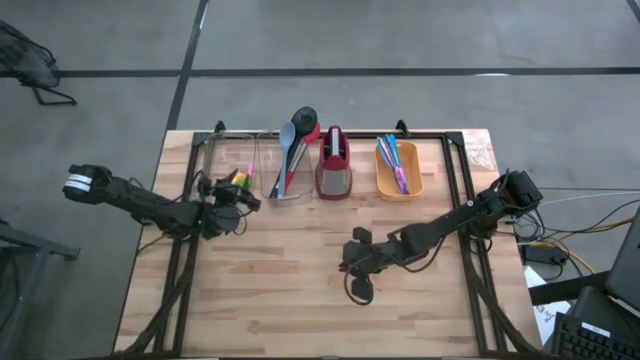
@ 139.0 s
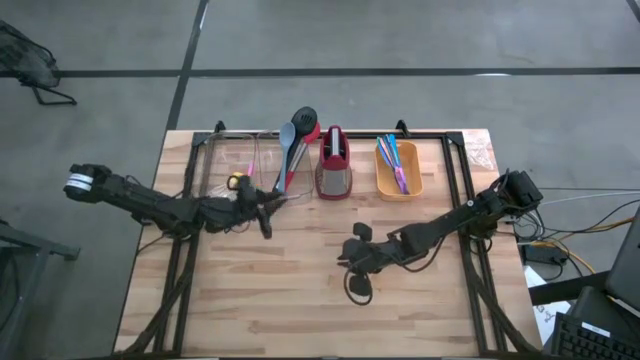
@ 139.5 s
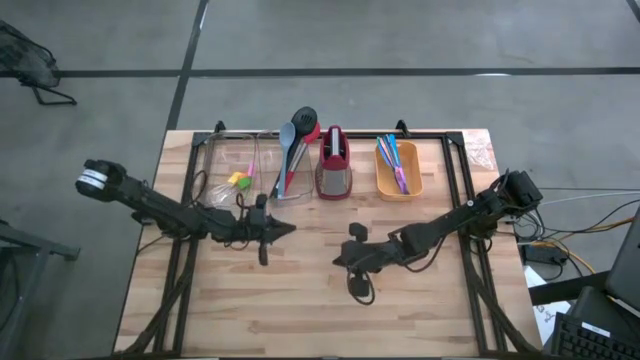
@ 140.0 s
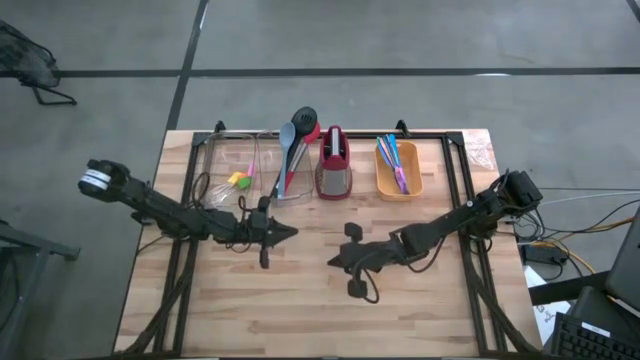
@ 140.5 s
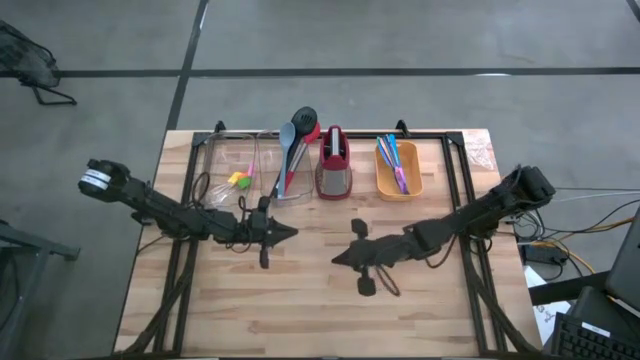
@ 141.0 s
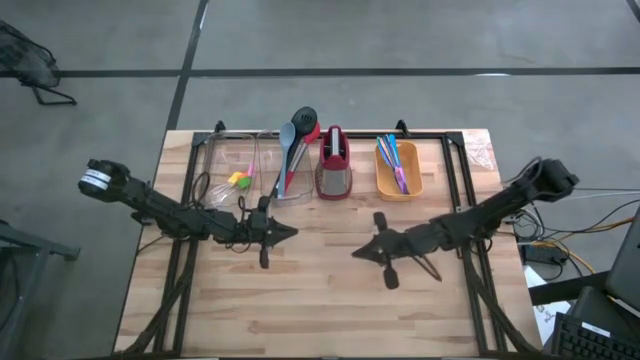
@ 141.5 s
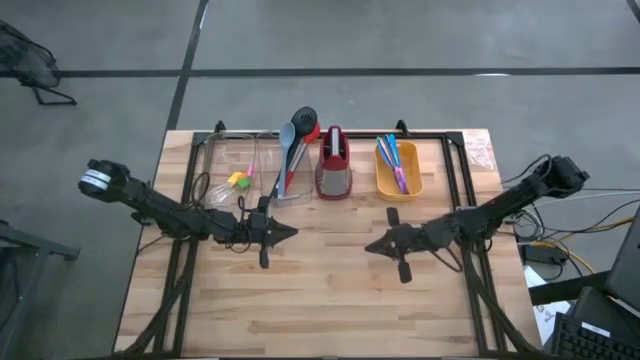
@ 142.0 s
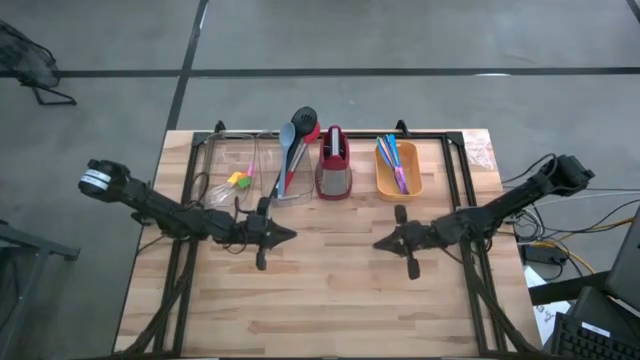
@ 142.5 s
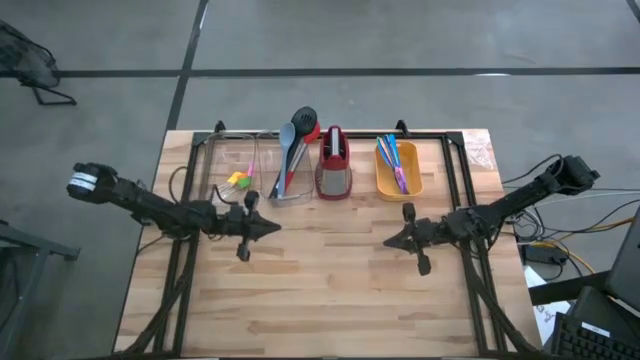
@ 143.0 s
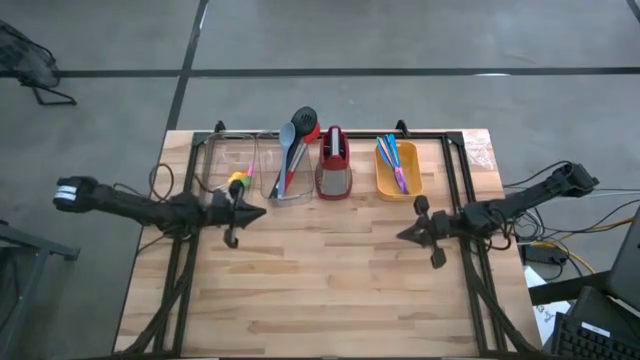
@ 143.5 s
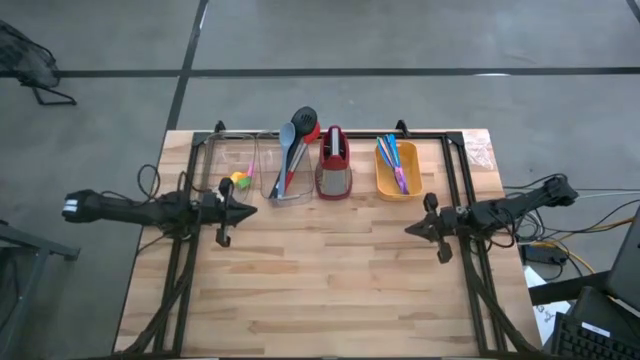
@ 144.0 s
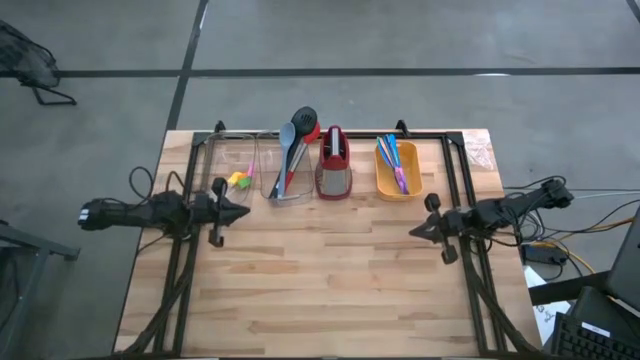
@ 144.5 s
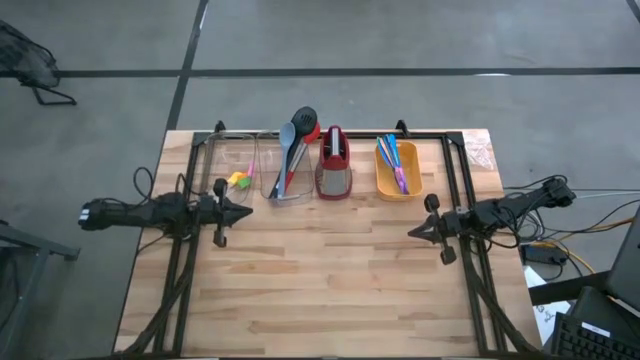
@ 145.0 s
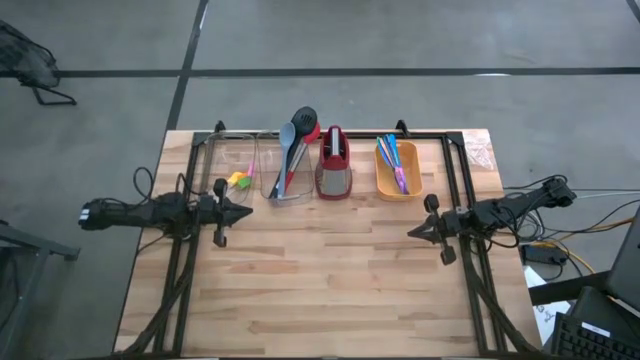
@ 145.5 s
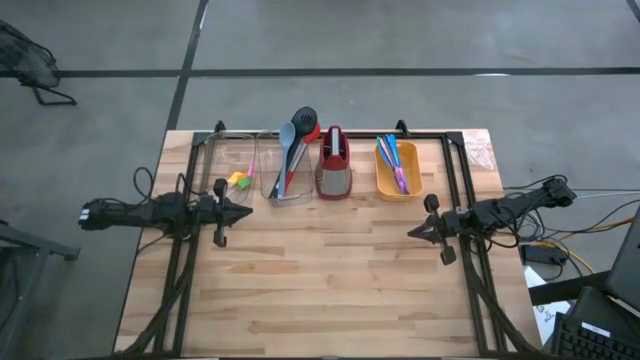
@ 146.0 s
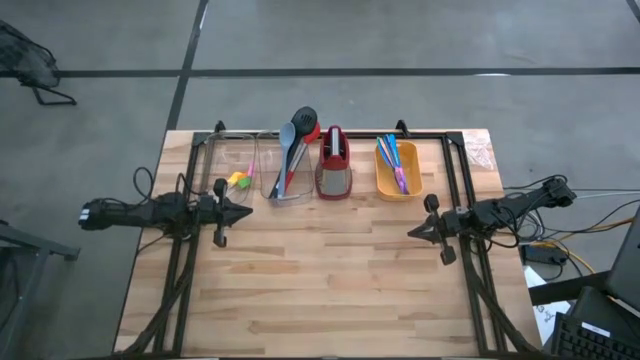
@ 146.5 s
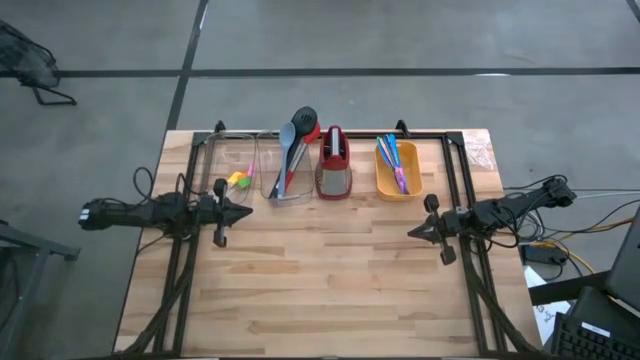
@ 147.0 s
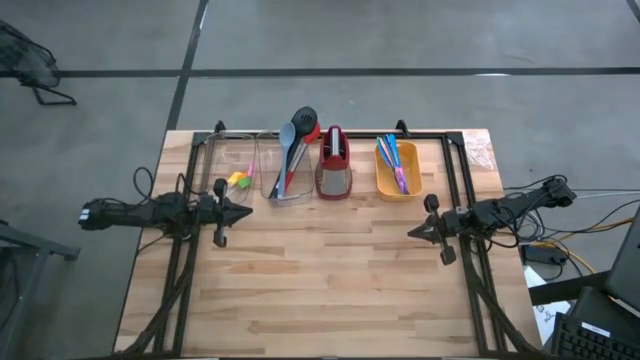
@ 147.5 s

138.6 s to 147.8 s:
Task: Pick & Place Kitchen Items
Return to Home Position

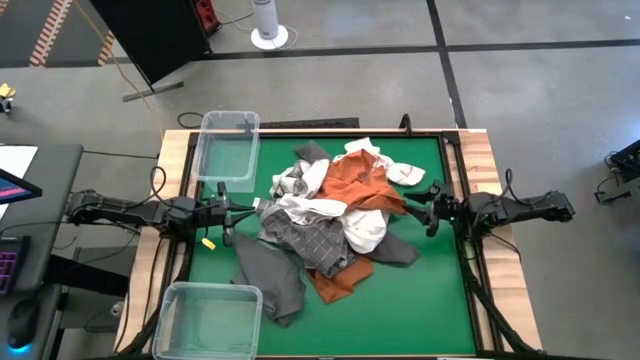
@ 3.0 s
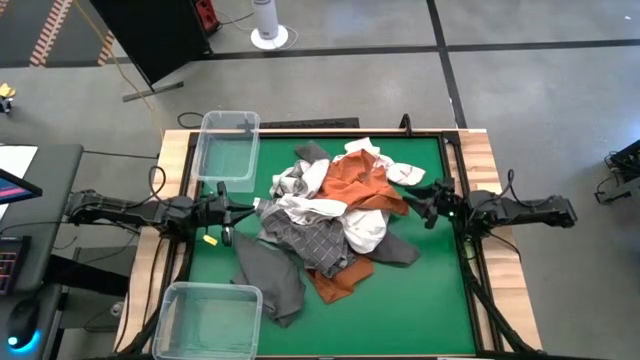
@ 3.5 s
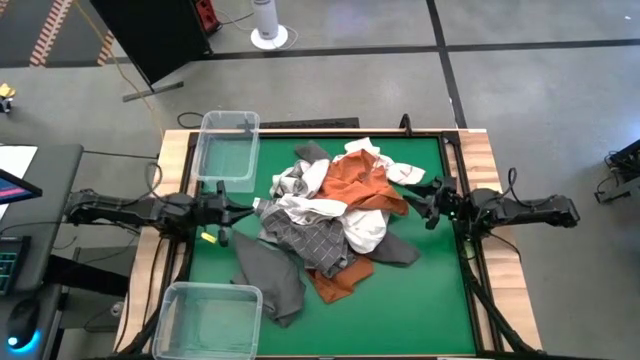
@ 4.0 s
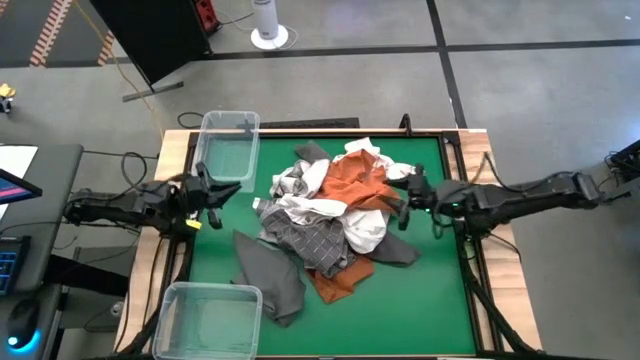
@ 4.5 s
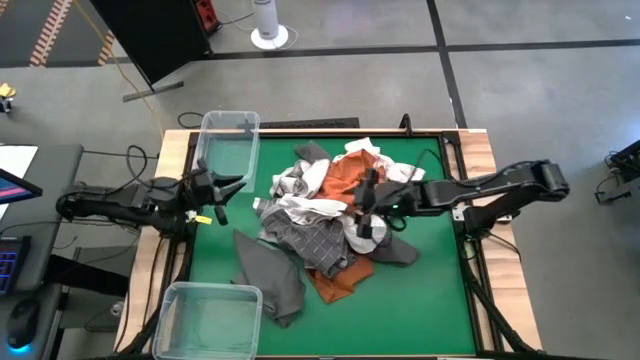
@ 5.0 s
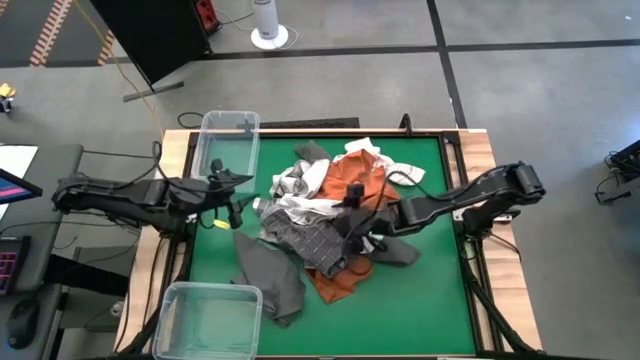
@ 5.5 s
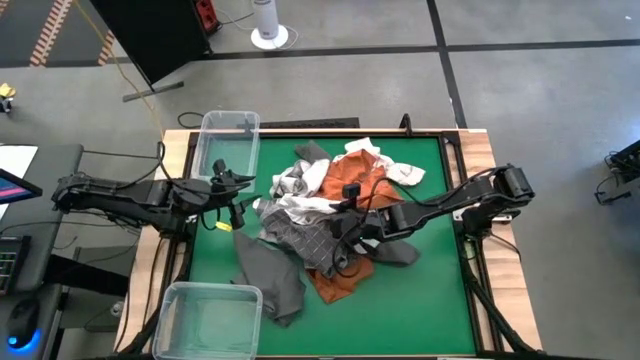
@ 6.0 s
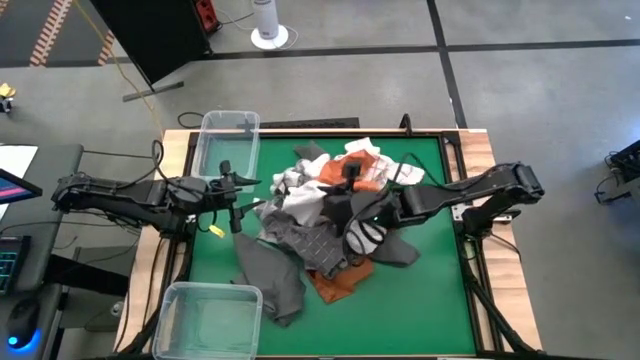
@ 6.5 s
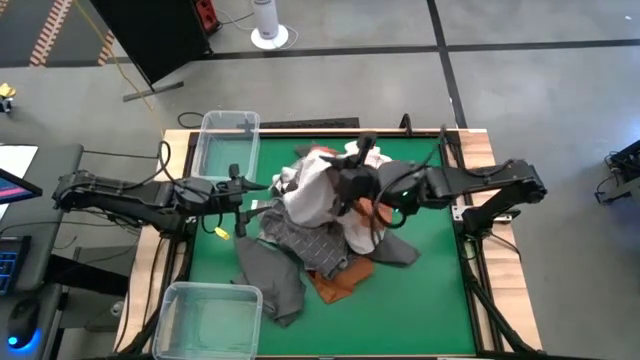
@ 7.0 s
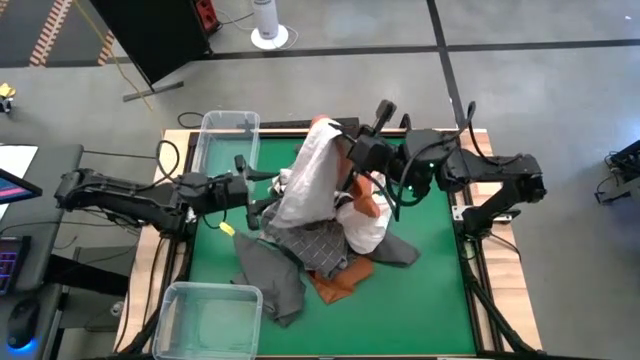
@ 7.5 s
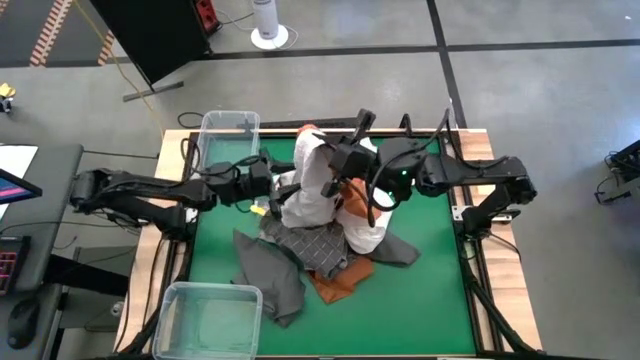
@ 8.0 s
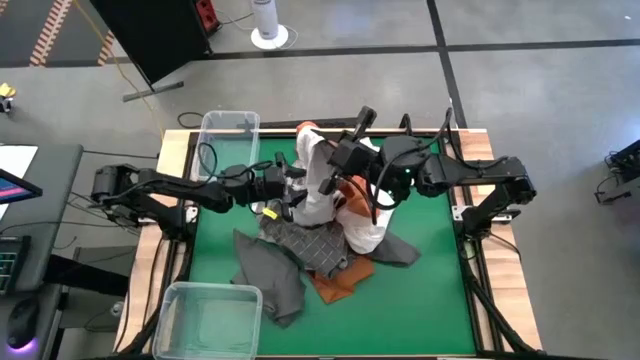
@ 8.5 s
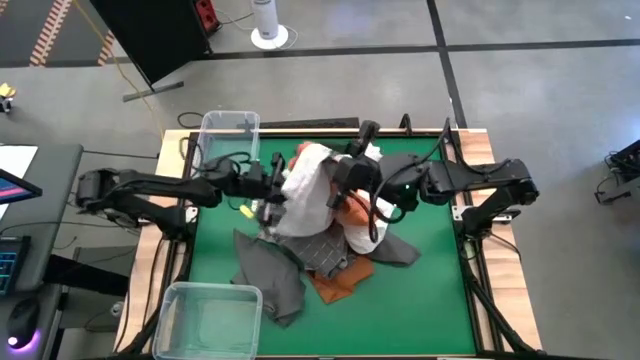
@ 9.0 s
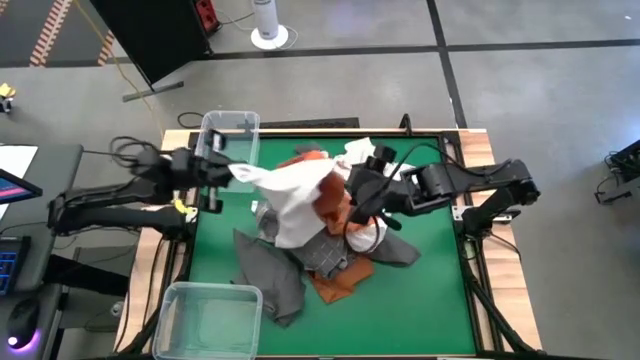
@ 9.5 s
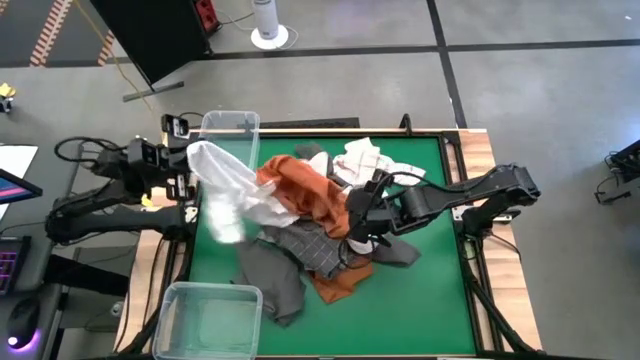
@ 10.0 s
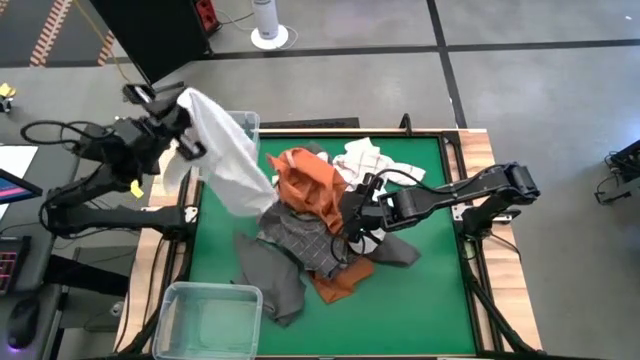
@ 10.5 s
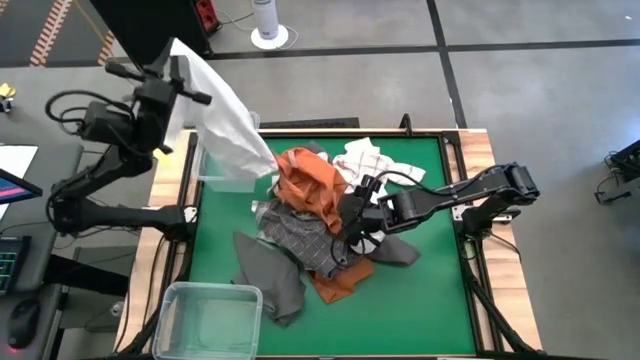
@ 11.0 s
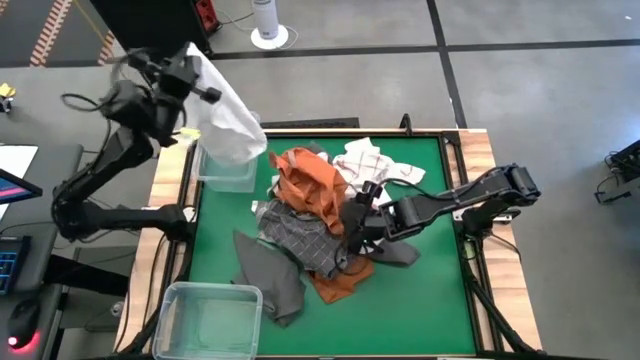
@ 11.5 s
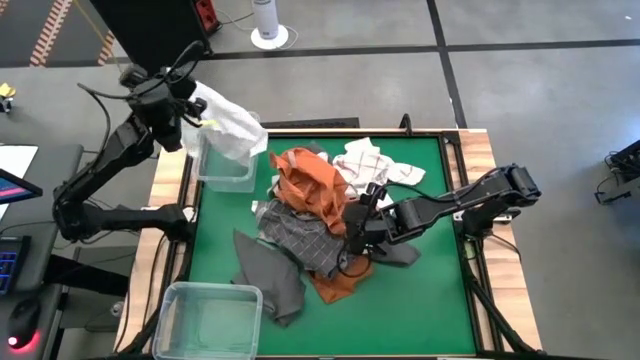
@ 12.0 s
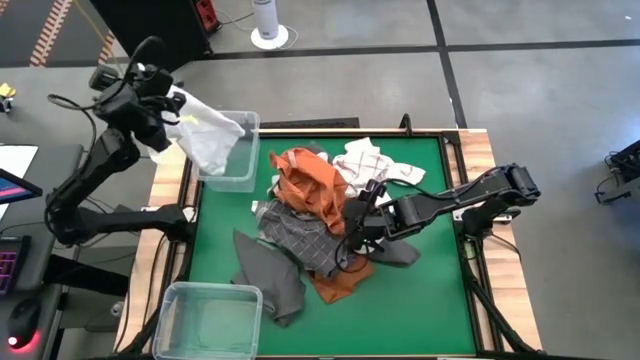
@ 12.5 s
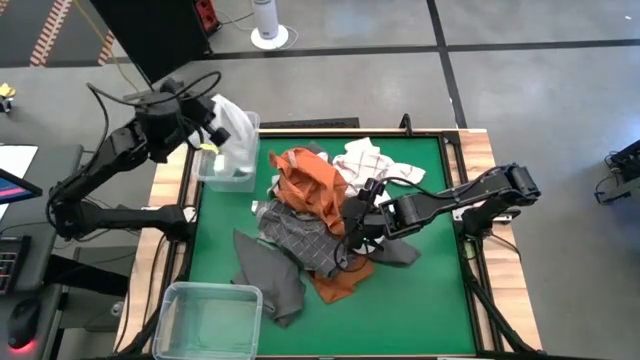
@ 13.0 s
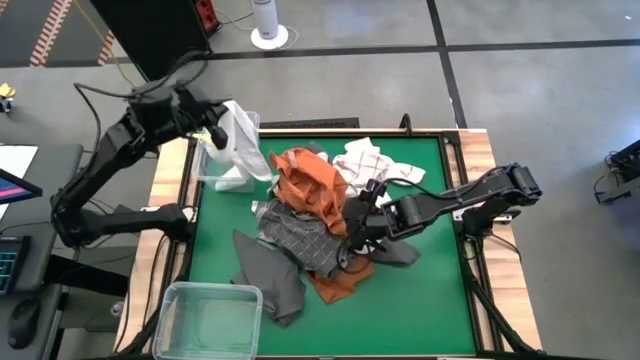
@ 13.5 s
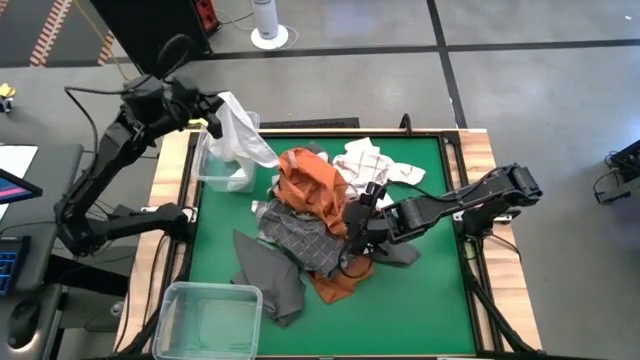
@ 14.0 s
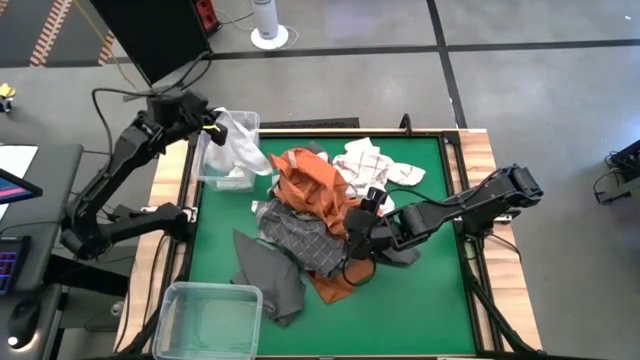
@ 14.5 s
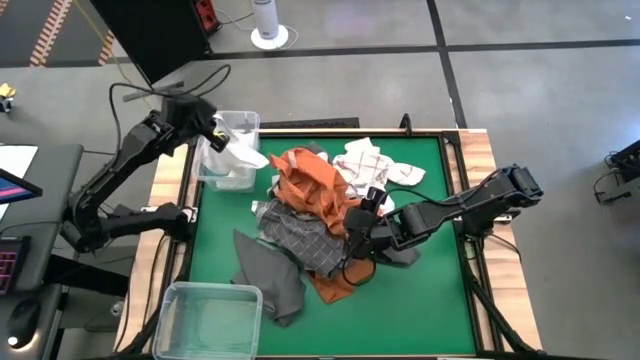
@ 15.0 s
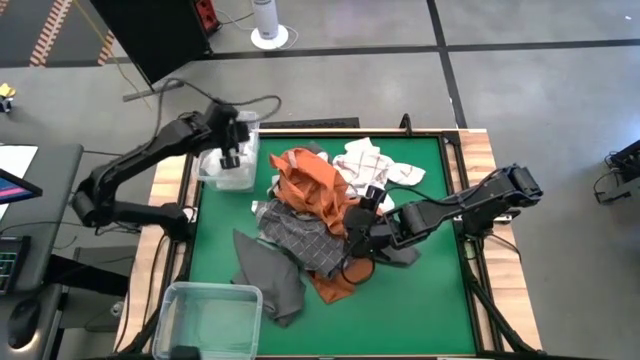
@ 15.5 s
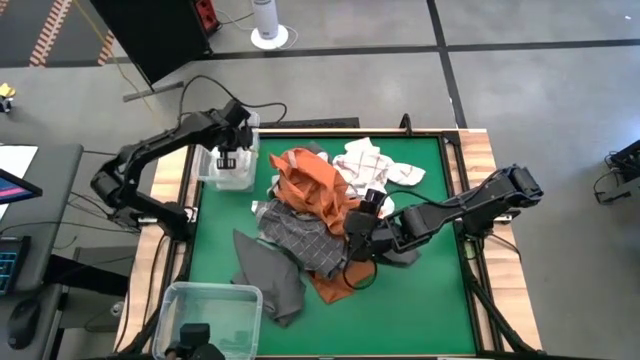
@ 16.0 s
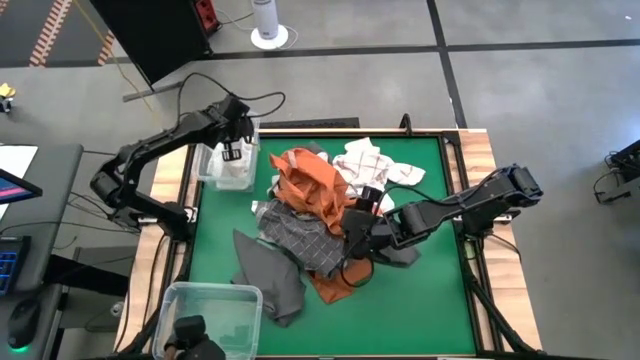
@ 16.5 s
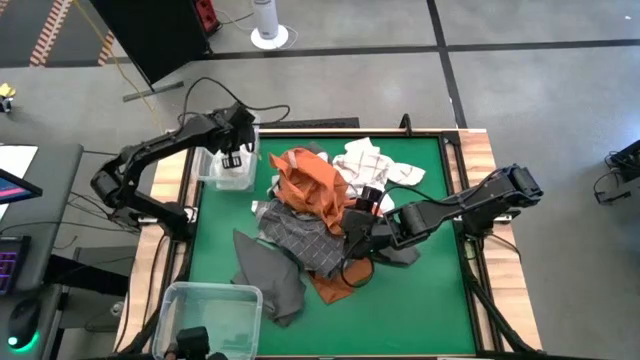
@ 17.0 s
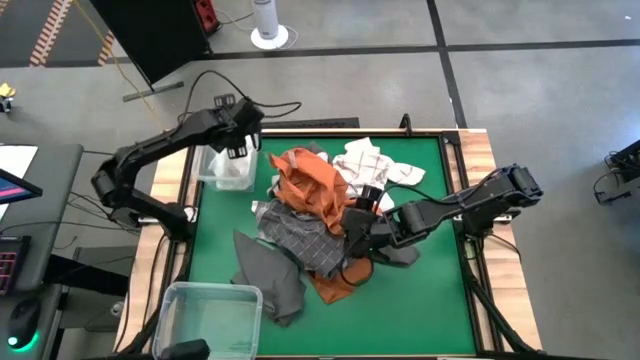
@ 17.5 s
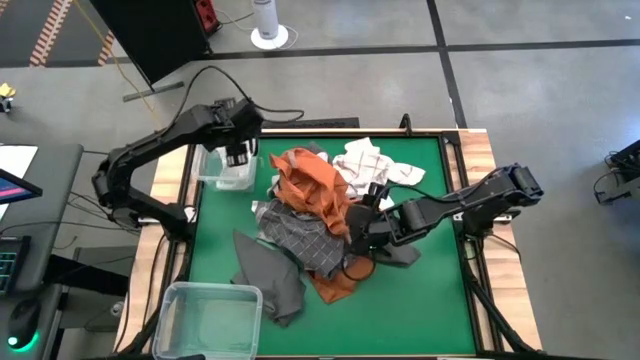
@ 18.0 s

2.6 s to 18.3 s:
Task: Sort towels by color in basket
Put the white towel into the top transparent bin
